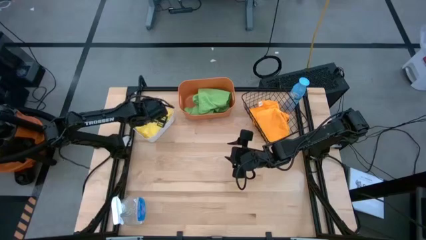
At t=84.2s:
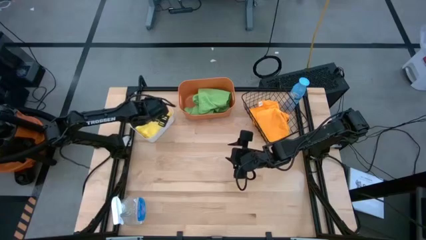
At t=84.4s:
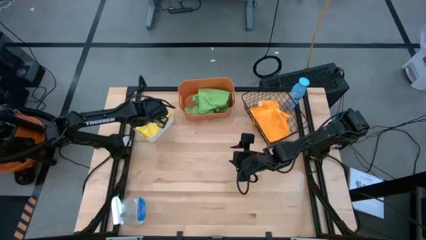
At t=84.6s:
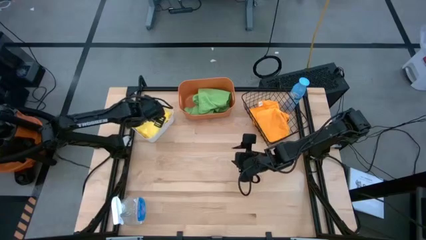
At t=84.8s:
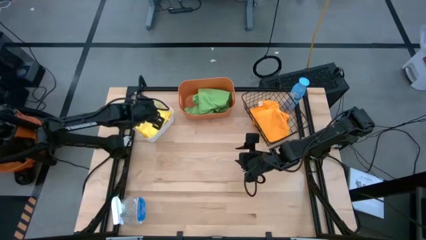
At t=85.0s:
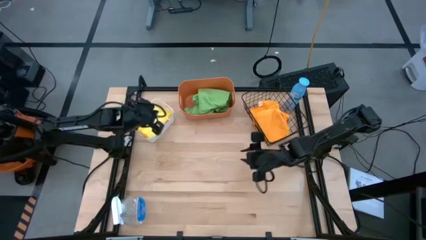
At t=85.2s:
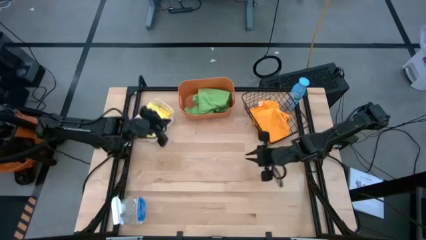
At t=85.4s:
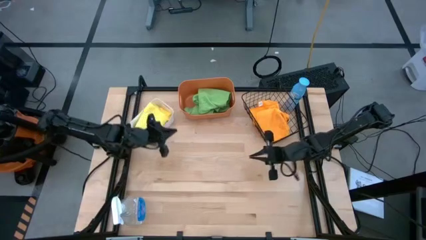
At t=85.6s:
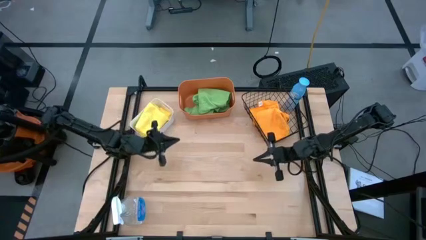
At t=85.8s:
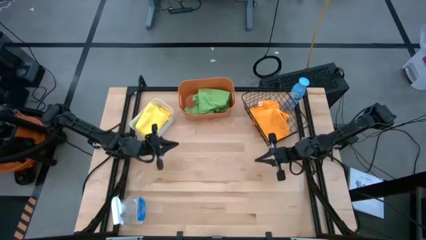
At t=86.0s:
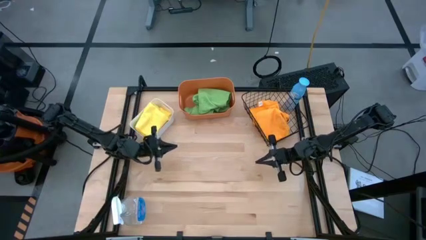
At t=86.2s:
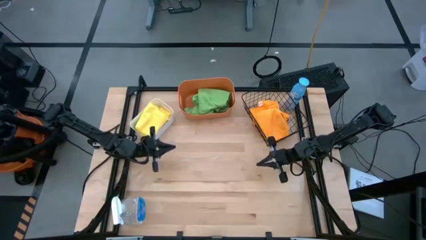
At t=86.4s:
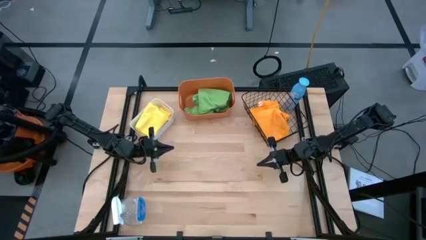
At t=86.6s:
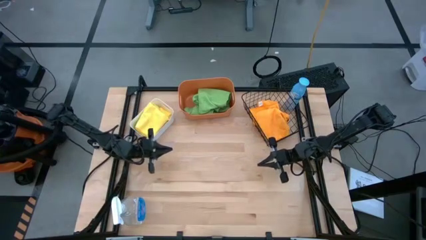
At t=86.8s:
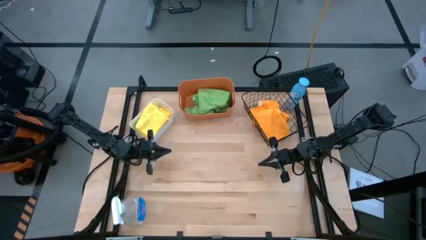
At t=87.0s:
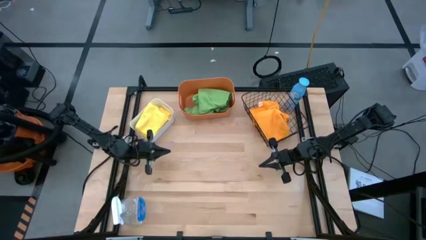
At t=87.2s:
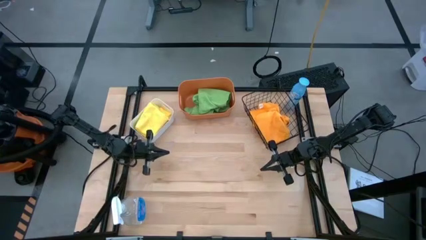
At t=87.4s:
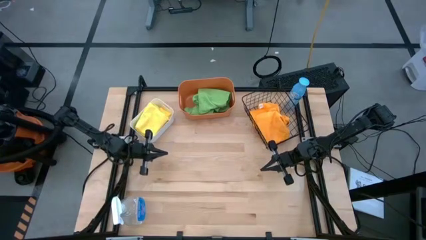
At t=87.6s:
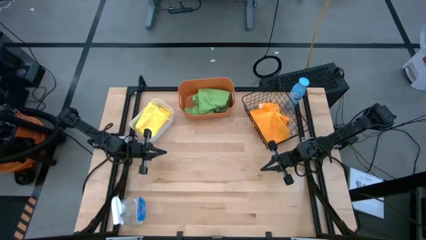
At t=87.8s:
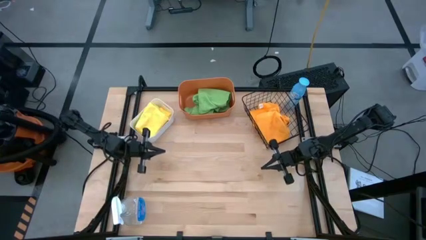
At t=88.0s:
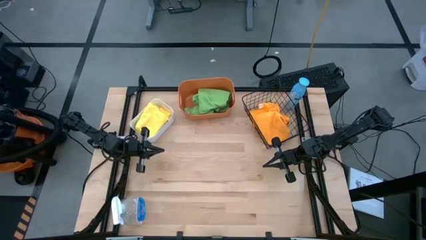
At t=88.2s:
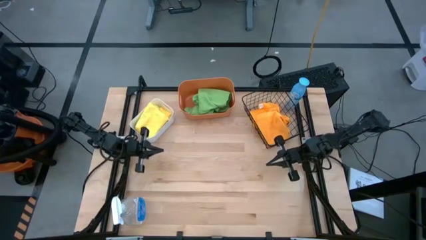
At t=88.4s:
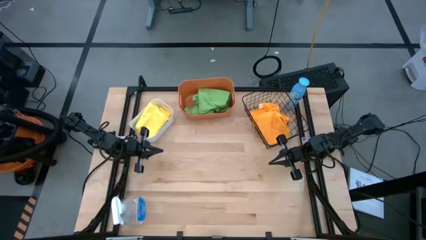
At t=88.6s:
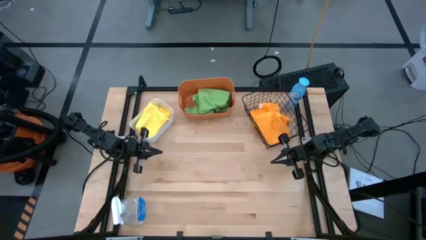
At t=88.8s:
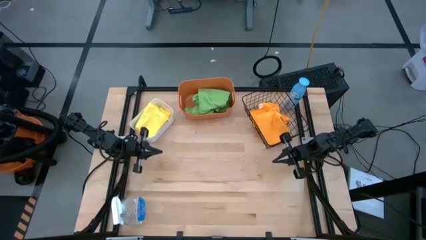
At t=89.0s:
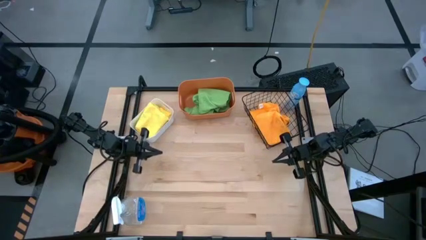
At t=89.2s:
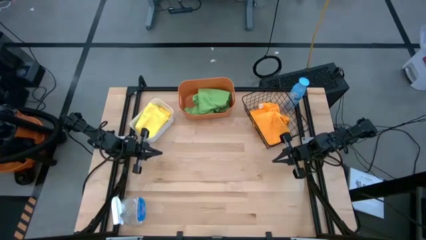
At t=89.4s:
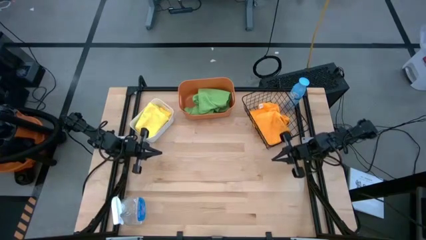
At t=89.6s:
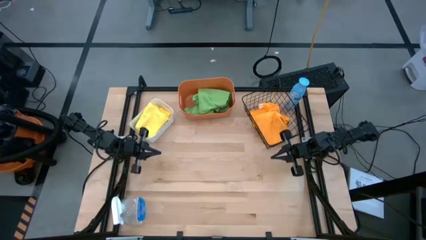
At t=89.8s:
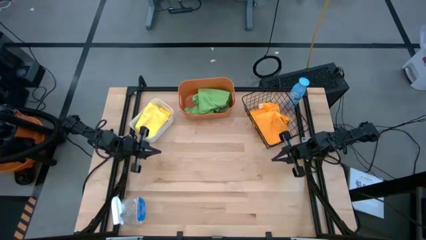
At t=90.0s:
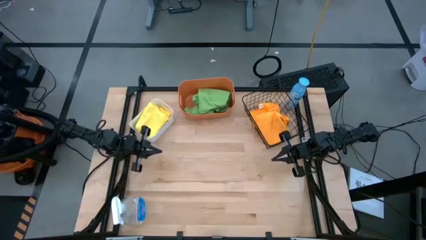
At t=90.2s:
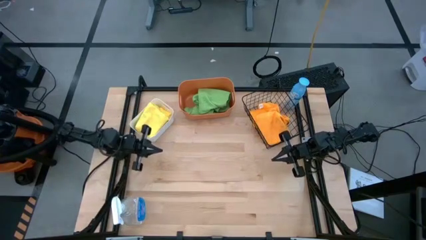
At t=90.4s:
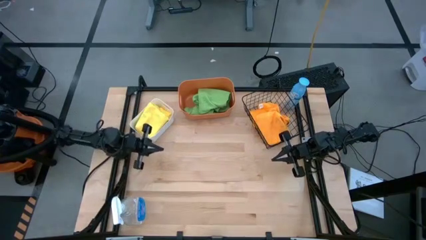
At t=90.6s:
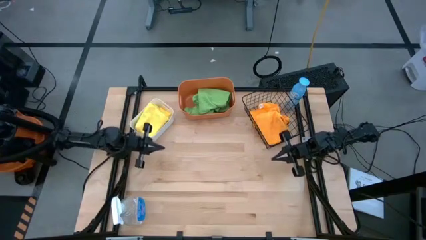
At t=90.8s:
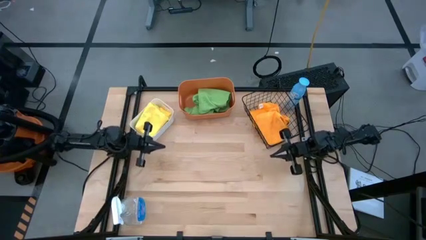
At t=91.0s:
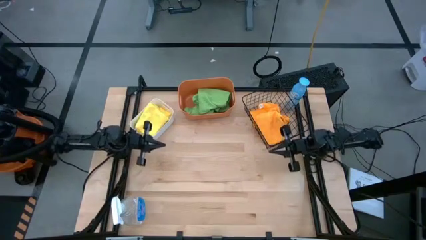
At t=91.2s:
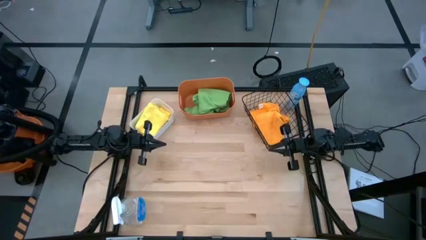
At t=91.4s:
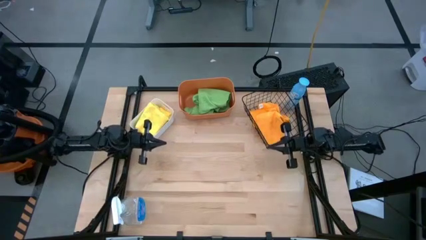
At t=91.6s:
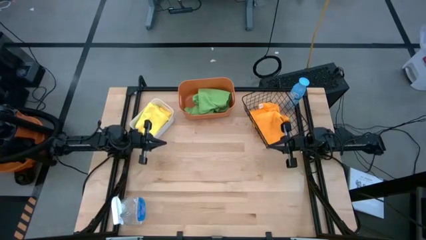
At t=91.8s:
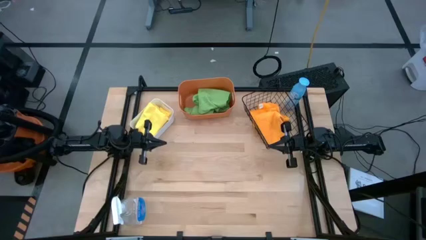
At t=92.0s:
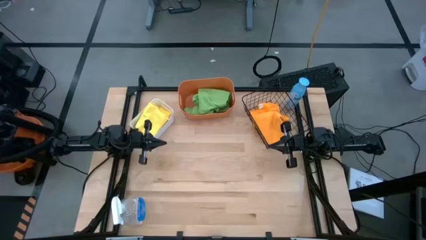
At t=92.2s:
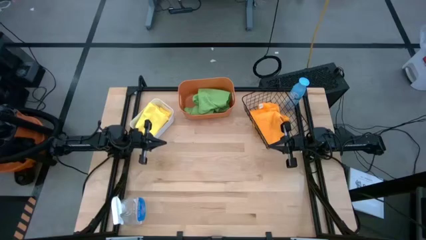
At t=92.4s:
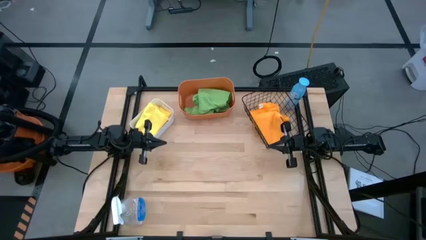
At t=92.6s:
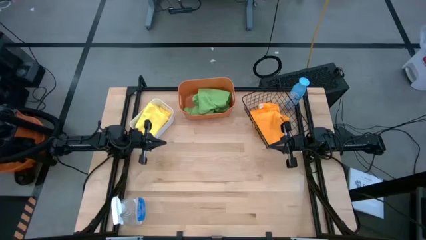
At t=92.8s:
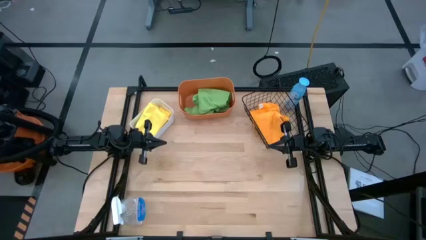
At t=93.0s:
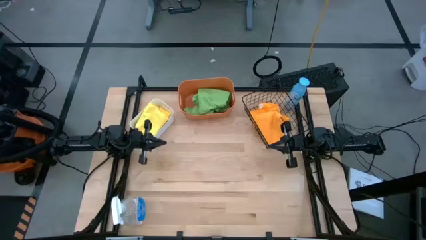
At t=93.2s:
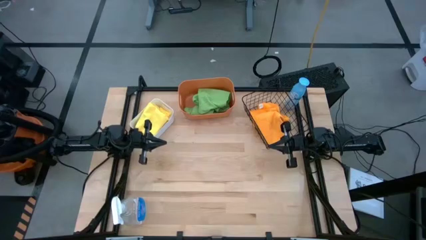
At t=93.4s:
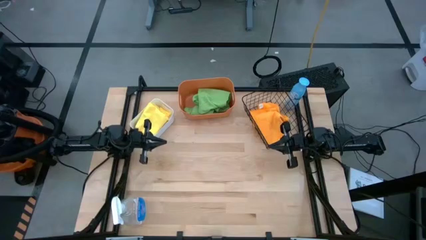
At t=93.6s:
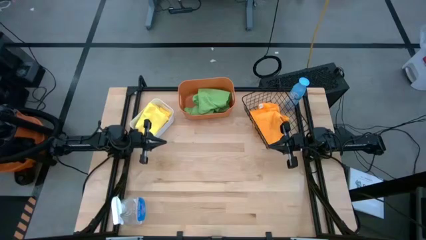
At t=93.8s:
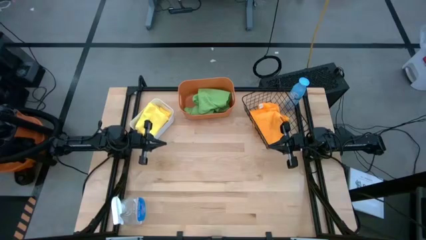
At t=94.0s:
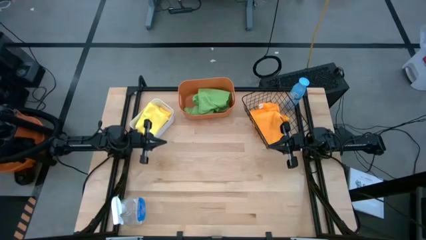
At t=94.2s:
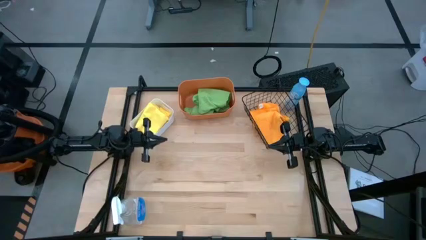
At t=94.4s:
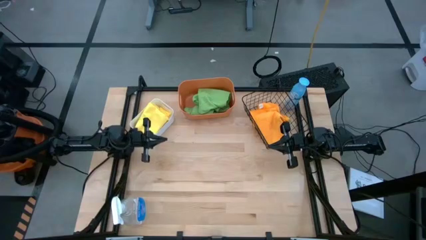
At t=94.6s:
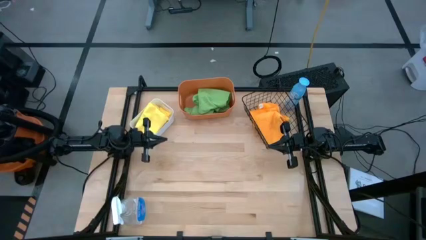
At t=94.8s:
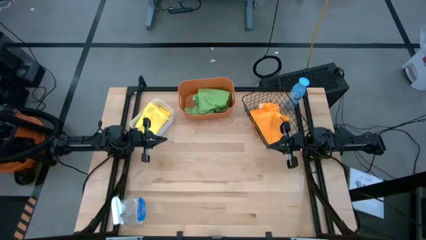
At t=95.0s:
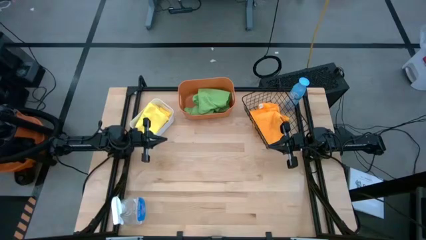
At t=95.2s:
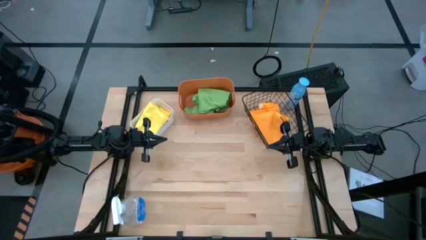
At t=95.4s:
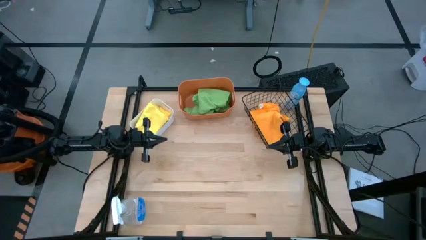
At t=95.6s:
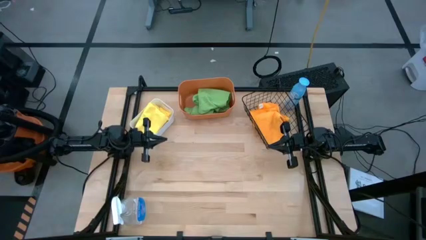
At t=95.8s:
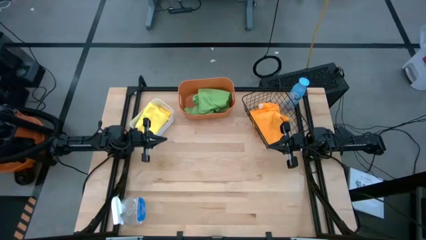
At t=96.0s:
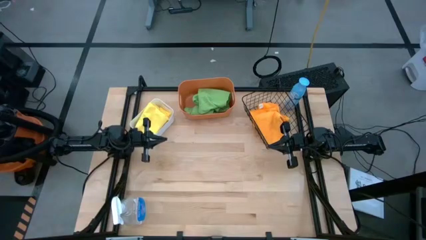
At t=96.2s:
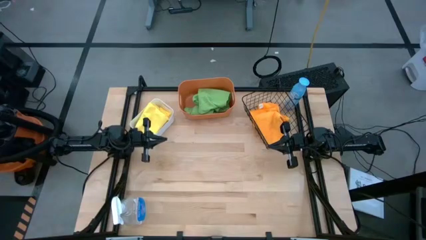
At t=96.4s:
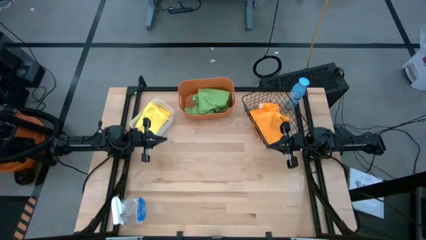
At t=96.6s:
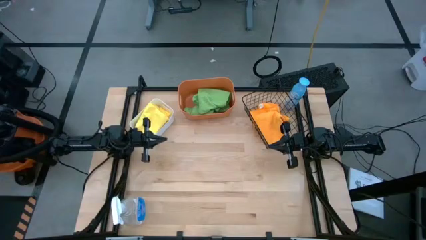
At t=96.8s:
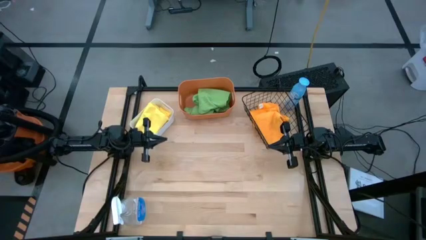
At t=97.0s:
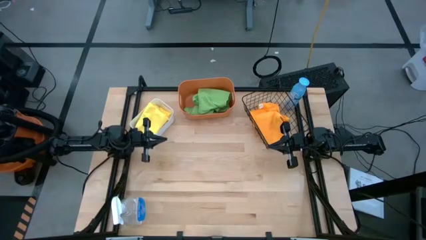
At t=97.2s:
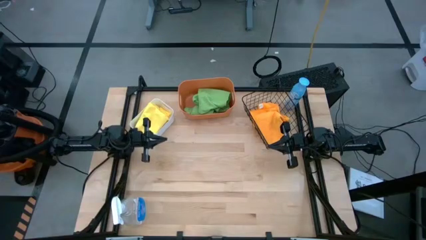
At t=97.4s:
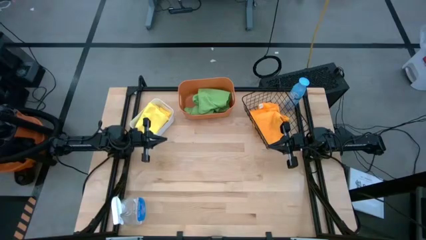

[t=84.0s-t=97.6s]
Task: Sort microfiber towel by color & place in baskets
Return to Home Position
